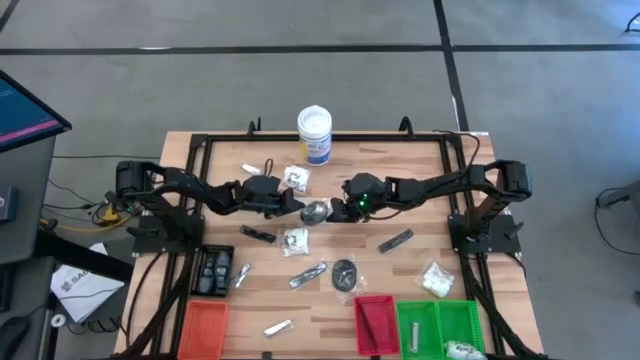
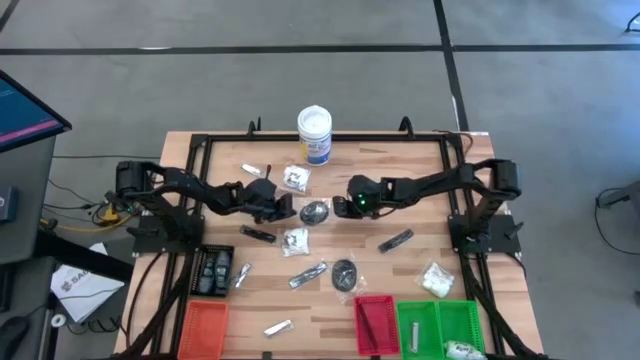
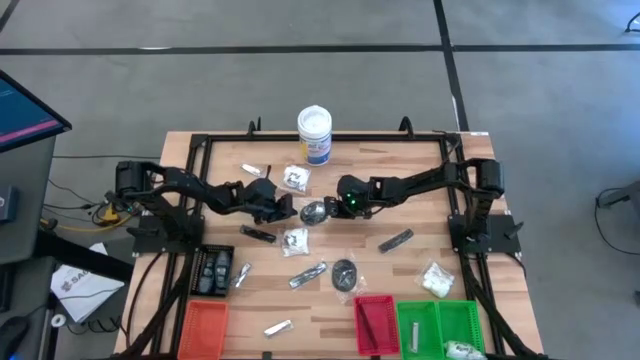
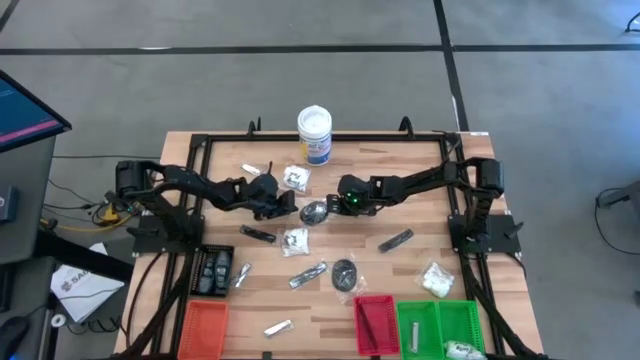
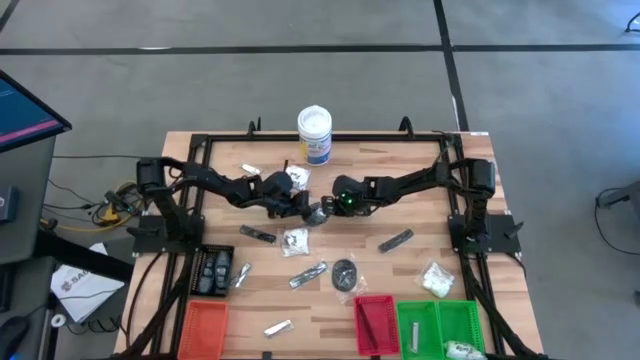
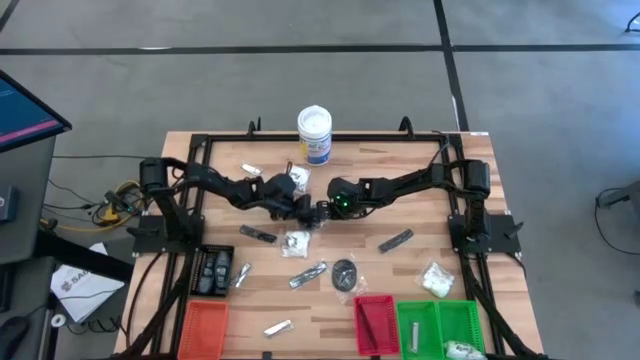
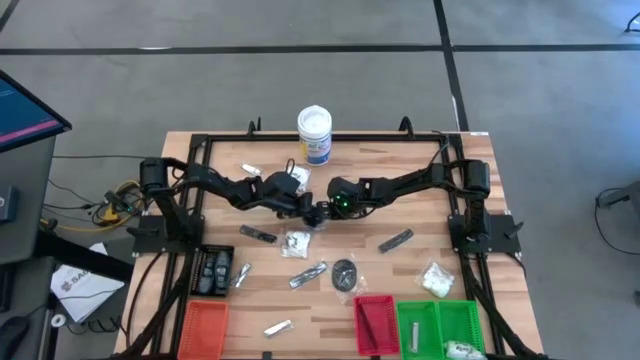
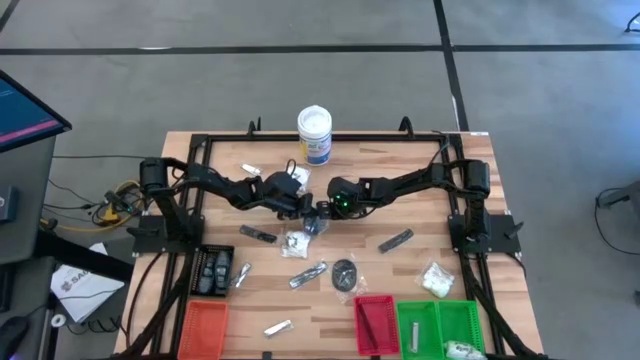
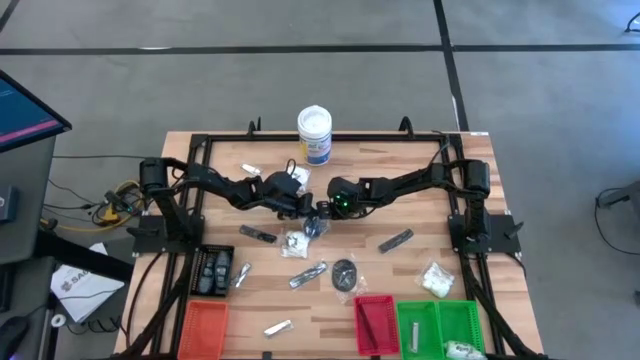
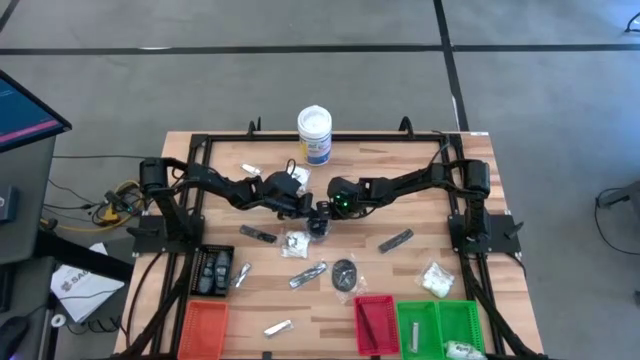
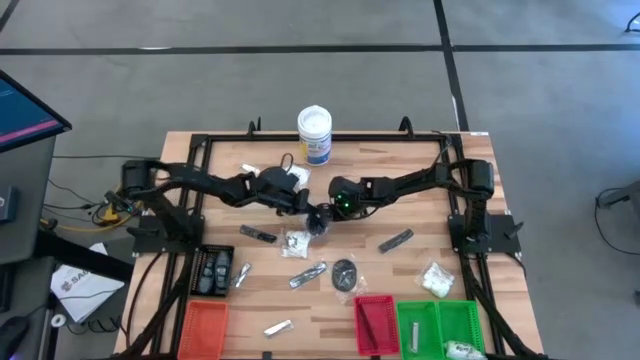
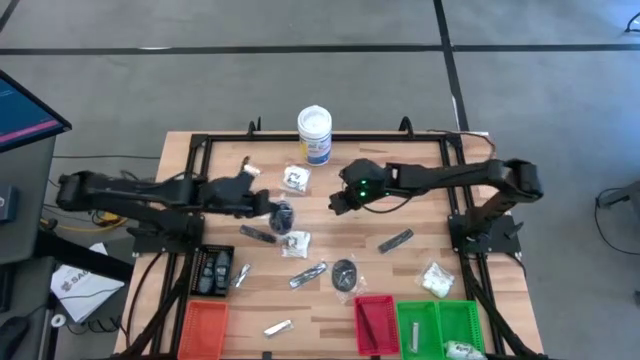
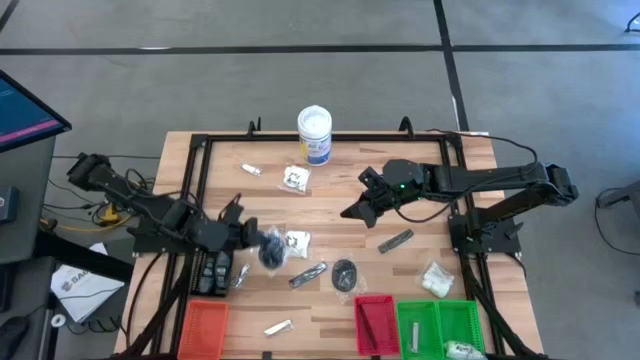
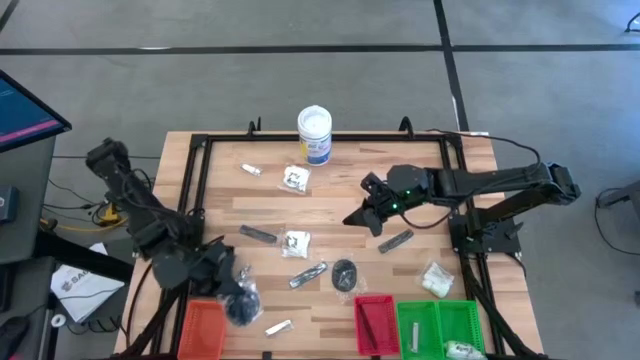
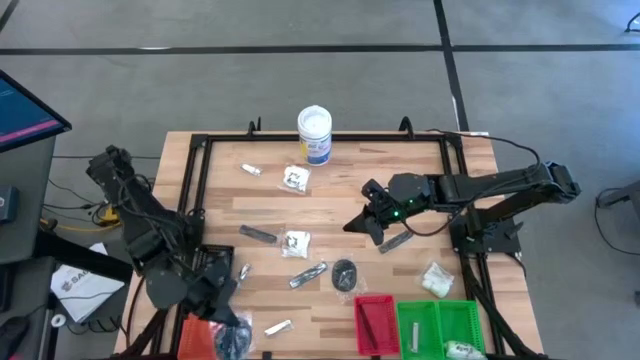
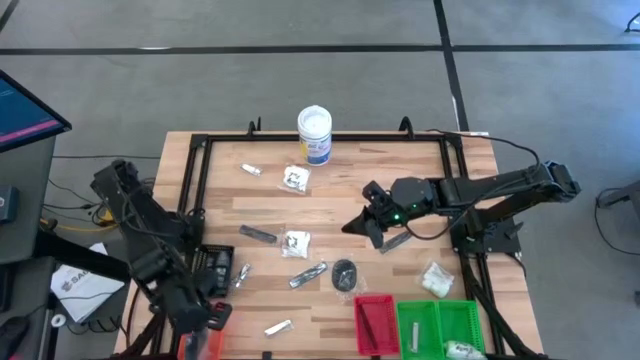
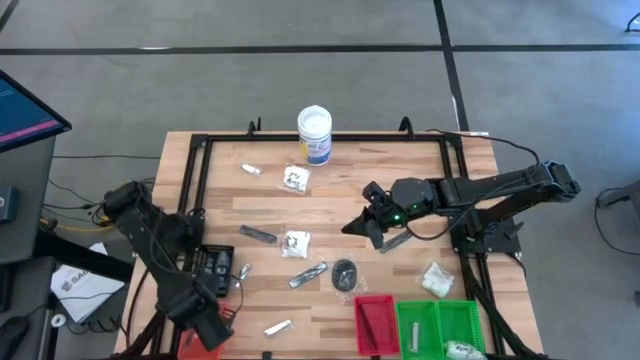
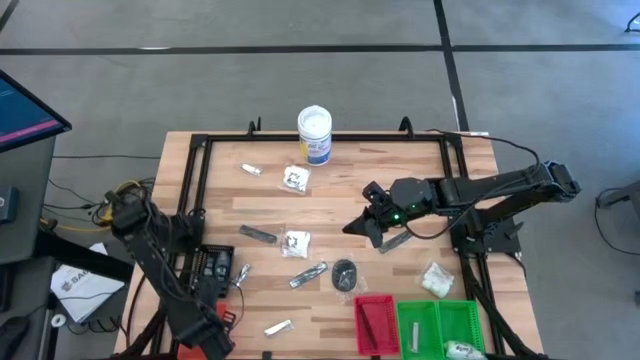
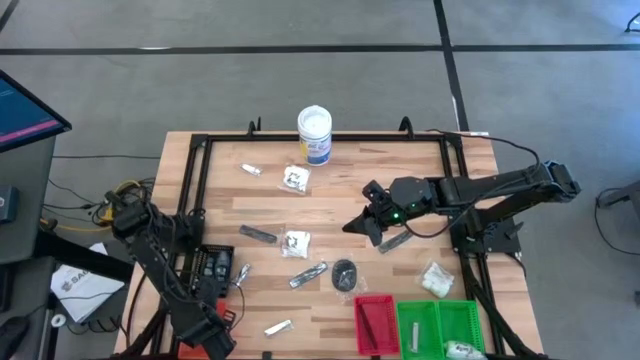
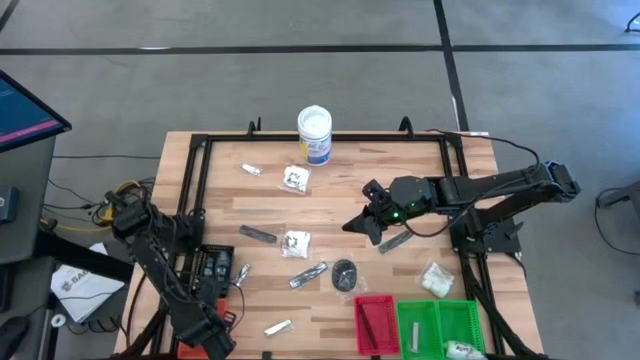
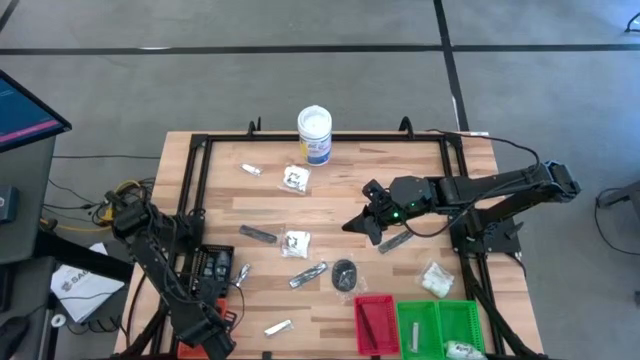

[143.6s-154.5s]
Task: Pick & Place Travel size toiletries
Put the black hairbrush into the orange bin

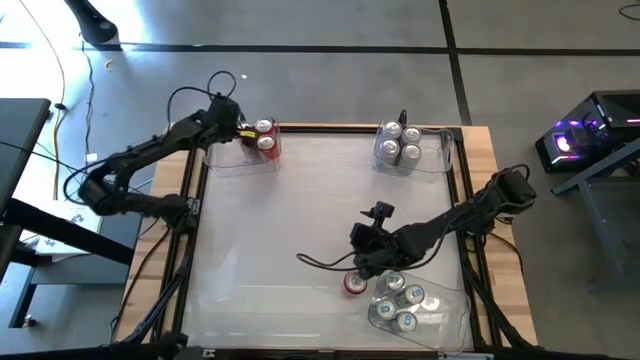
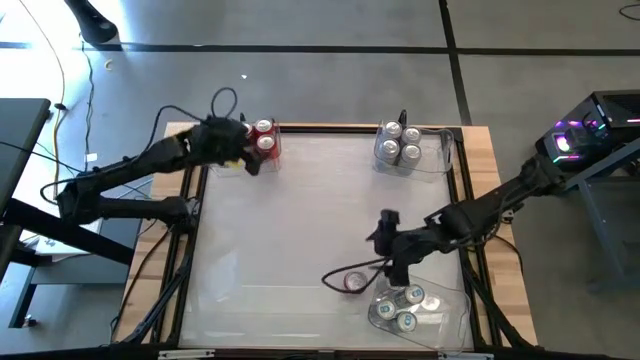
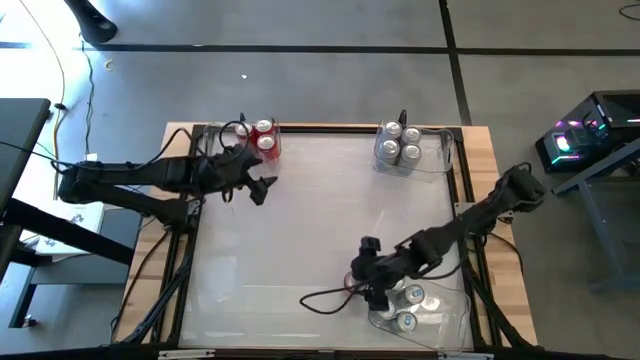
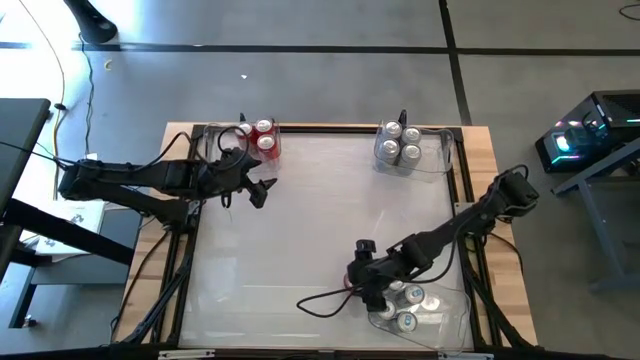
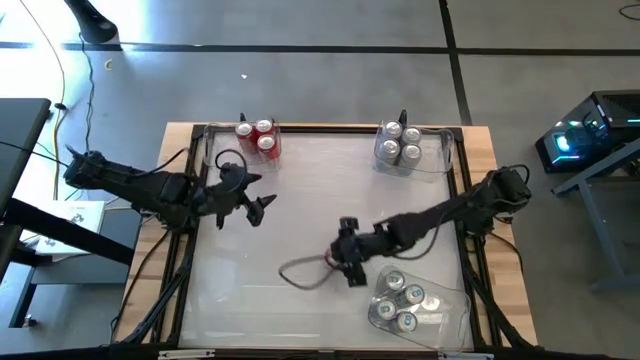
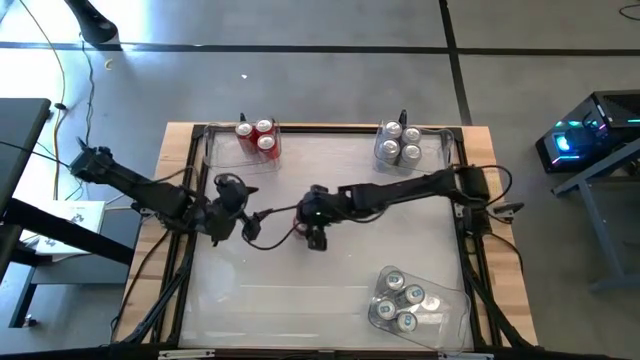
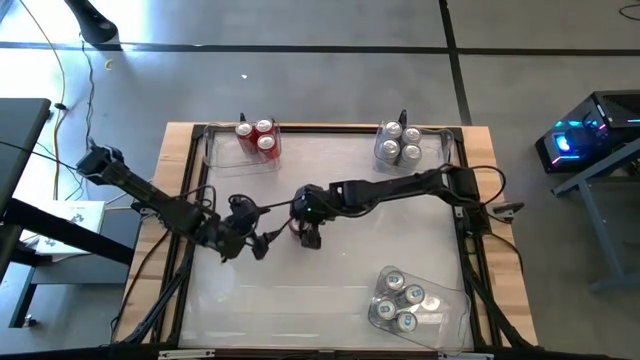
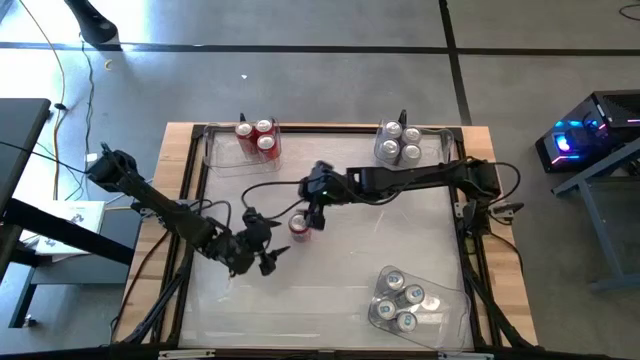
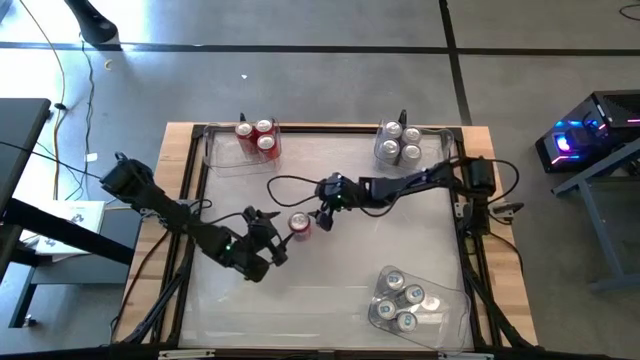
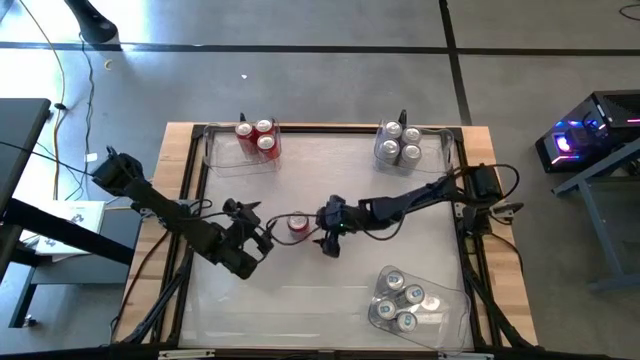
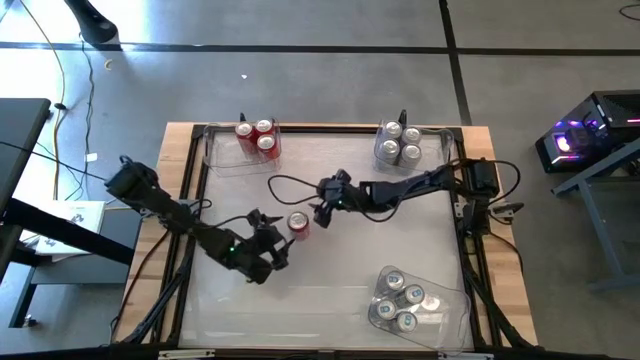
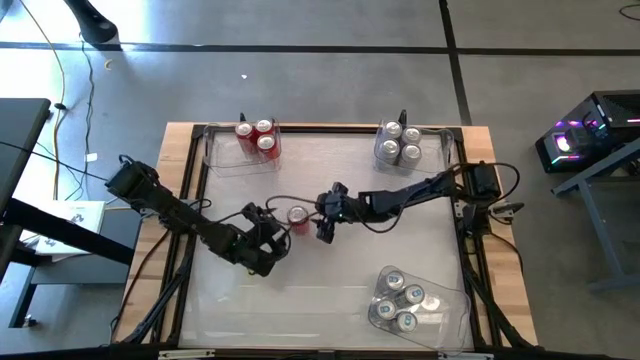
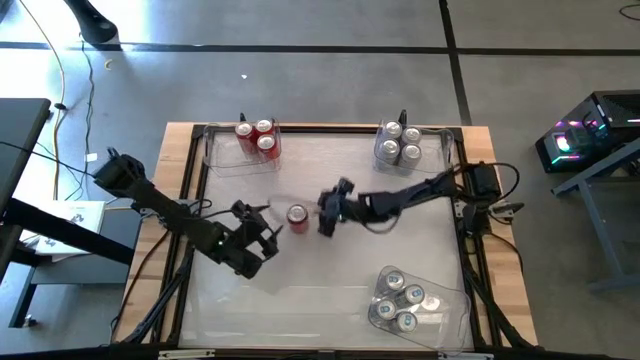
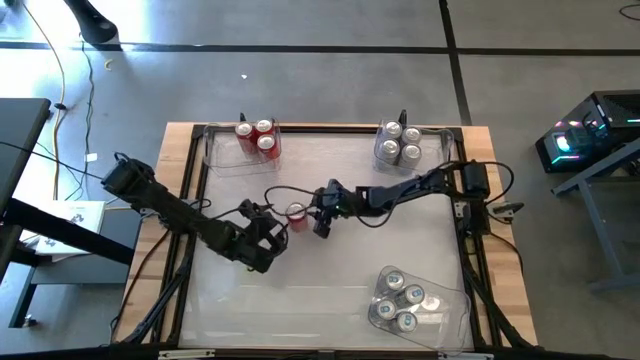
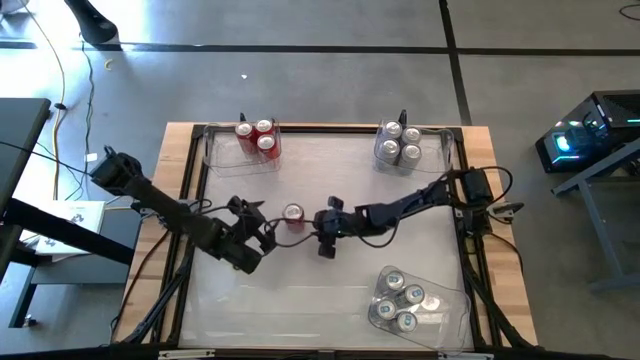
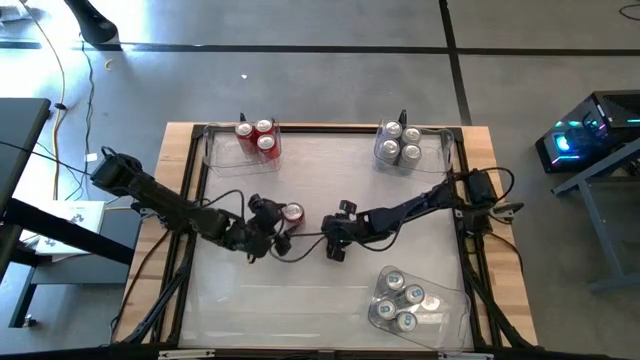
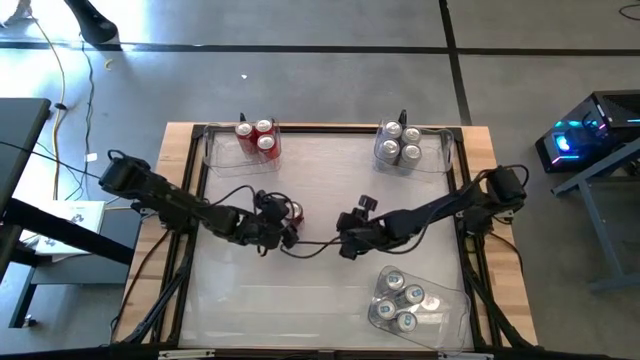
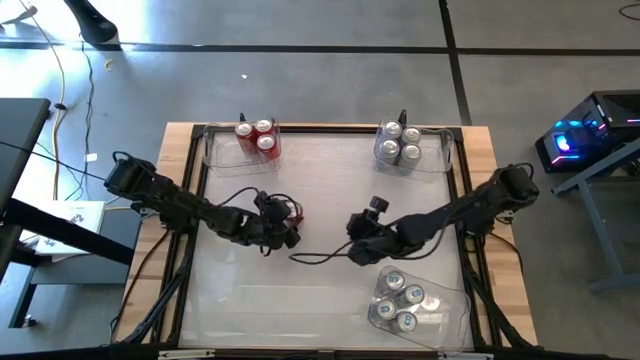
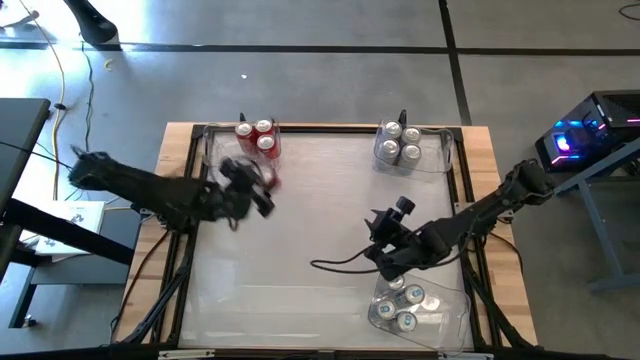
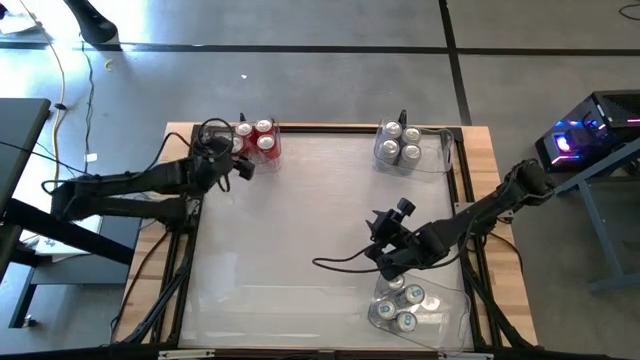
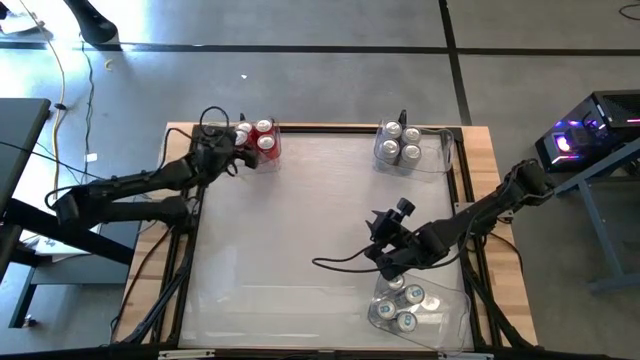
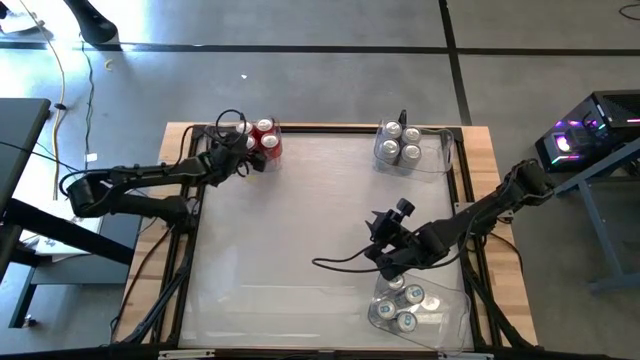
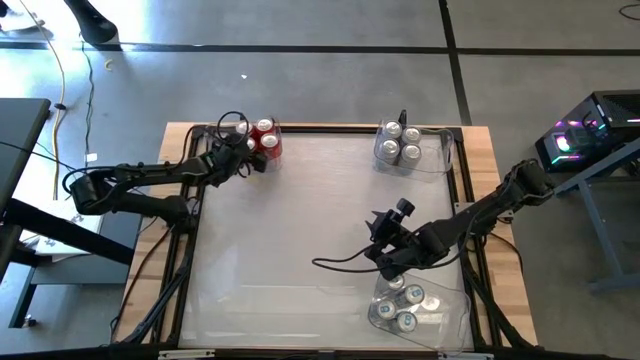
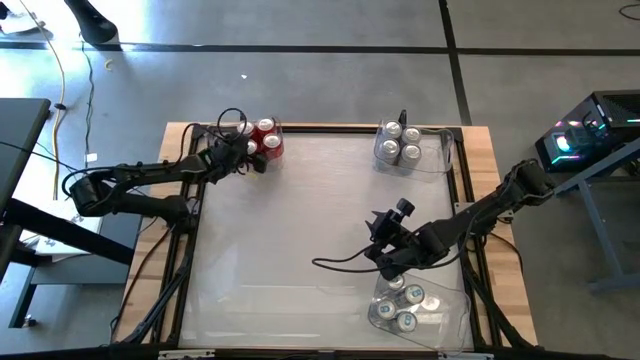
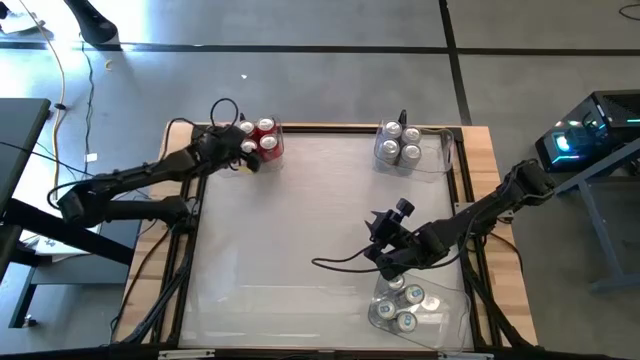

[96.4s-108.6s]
Task: Sort soda cans
Put the red soda can into the top left transparent bin
